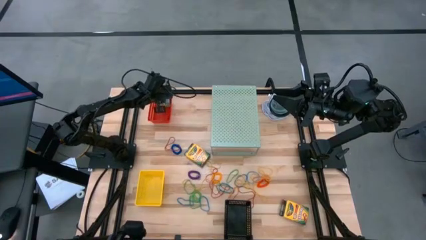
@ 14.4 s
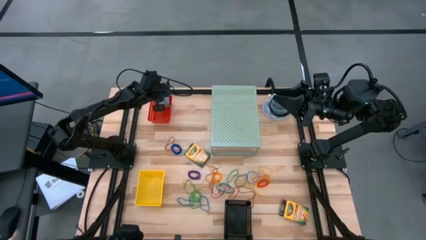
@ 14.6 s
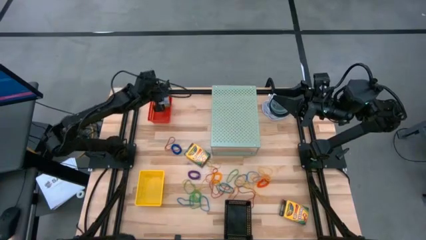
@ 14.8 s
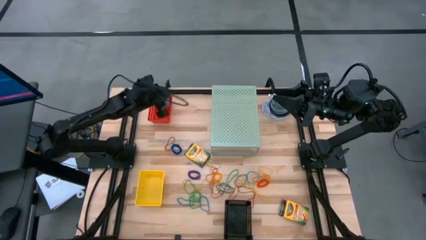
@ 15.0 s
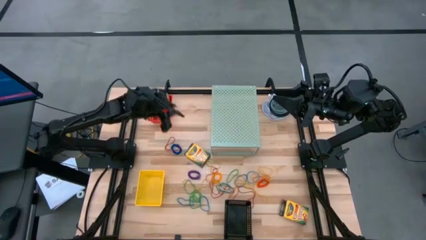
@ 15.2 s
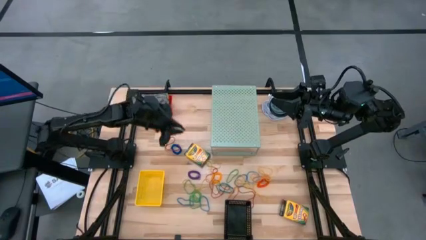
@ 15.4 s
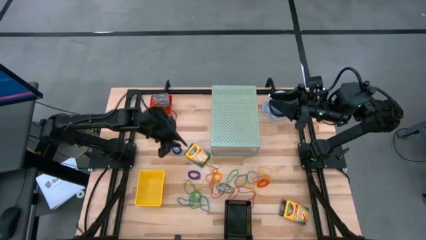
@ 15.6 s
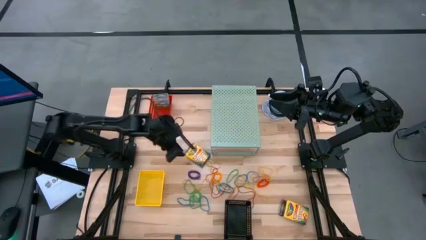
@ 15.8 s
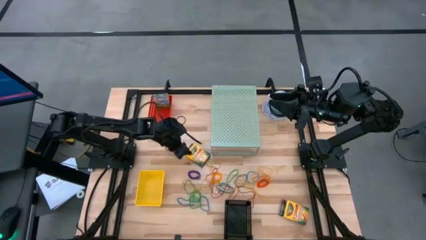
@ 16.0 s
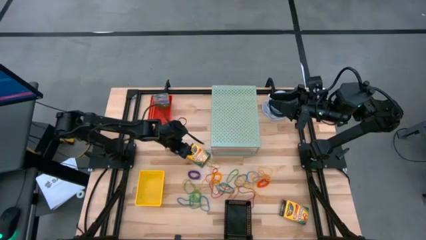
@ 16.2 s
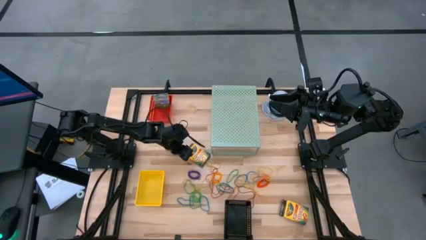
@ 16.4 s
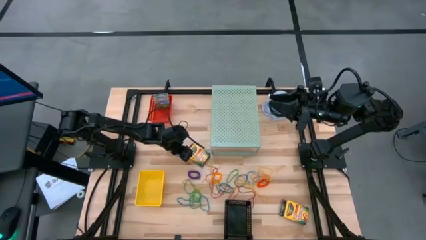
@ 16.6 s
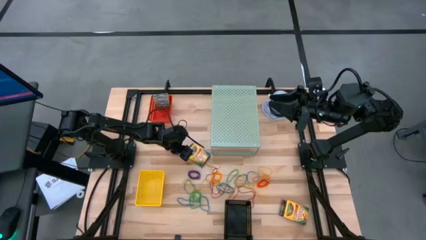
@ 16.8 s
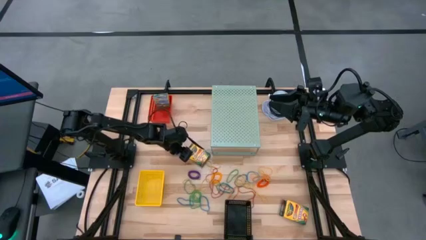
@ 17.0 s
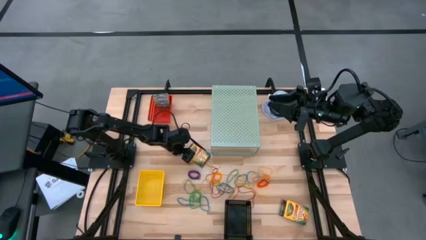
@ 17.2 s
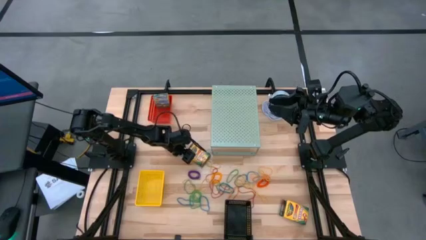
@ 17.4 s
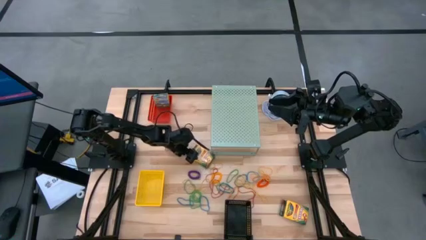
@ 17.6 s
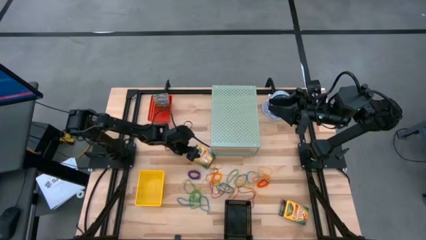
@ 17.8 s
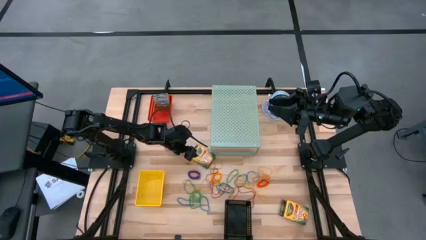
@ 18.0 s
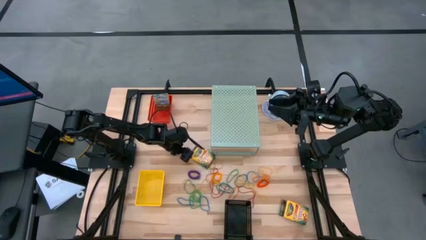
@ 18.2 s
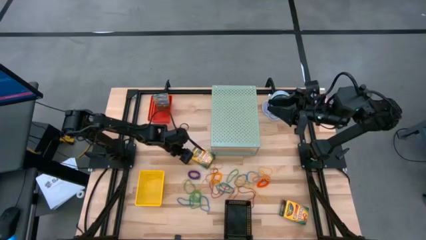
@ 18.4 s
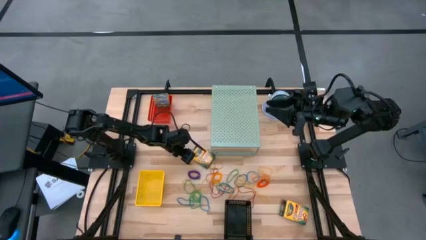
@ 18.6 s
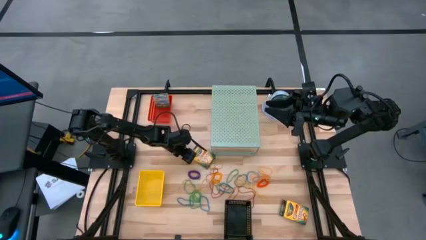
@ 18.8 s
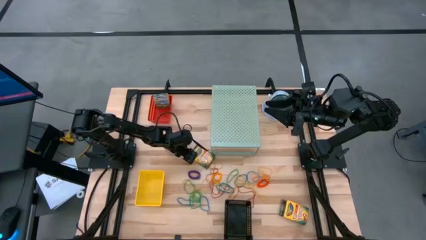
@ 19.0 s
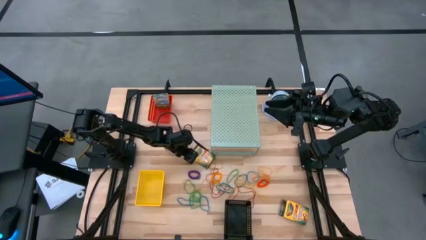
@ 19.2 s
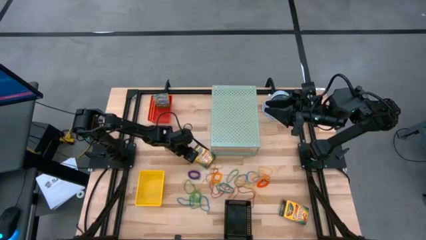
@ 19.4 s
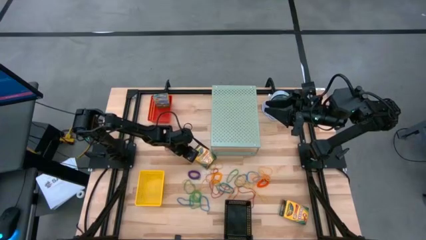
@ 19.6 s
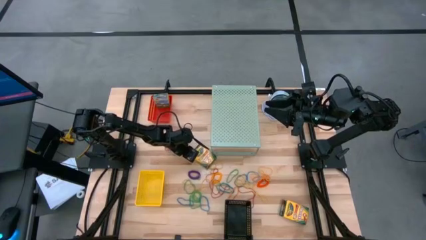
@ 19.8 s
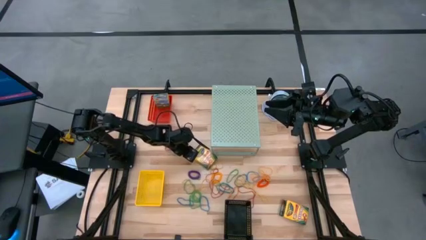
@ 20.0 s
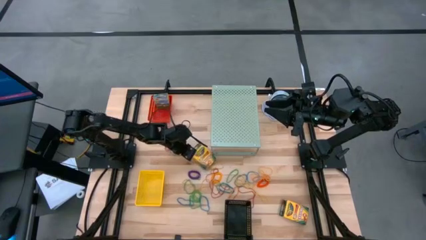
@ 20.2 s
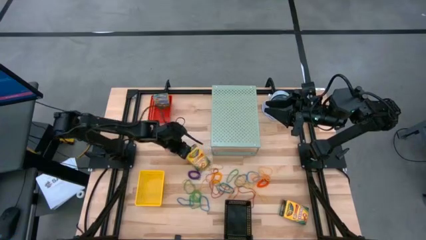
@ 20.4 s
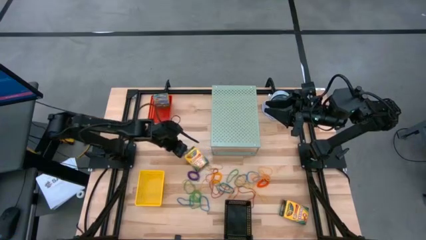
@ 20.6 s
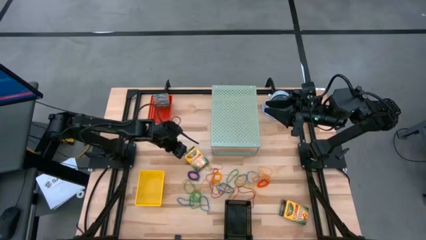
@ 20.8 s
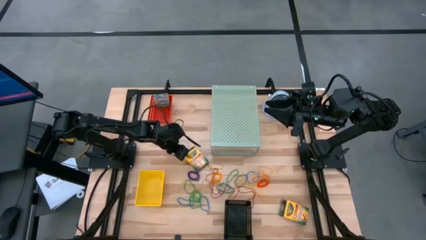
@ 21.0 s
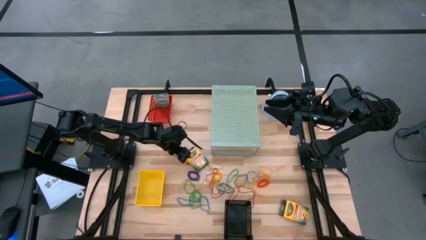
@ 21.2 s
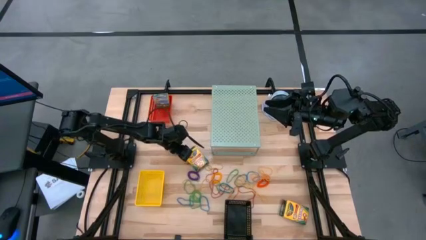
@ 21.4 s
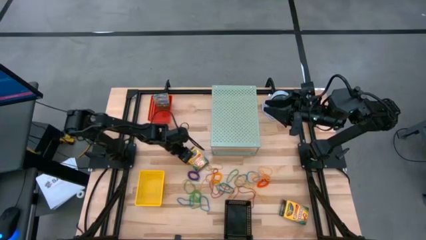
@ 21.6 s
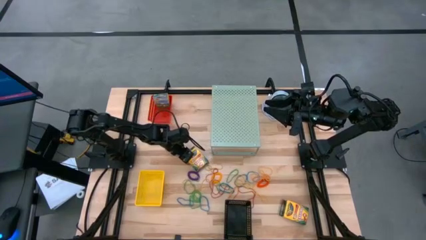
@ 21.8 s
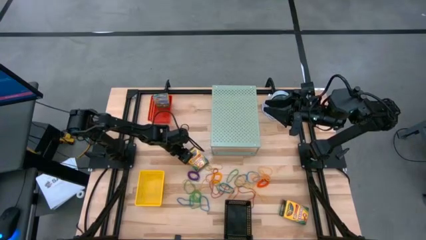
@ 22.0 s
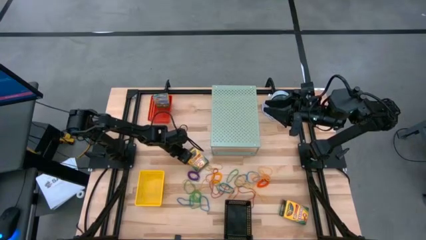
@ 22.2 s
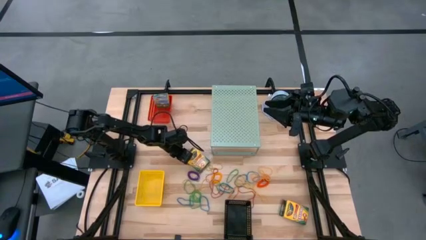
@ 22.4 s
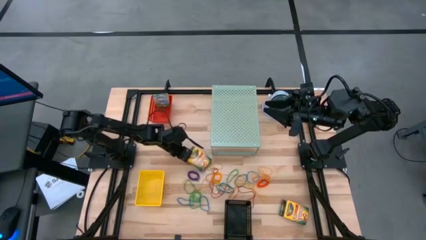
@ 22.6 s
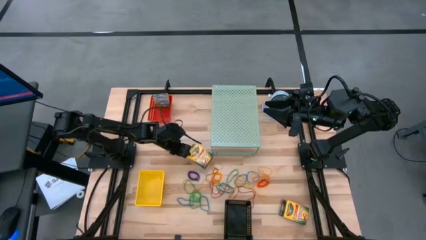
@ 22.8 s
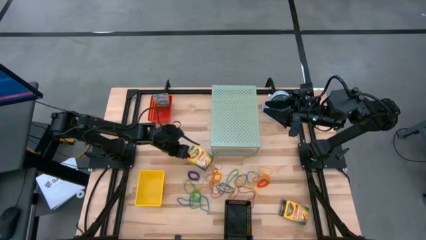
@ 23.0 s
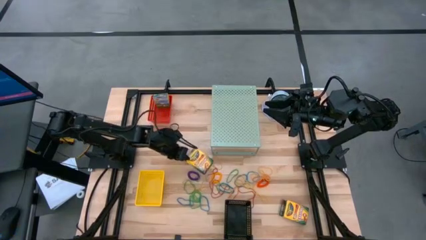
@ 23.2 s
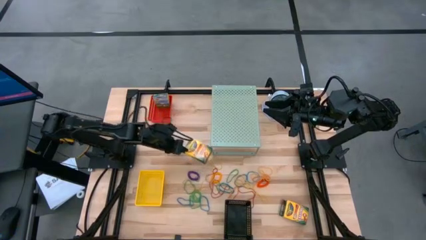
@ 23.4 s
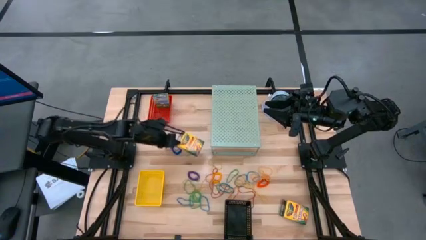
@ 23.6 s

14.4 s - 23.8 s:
Task: Pick & Place Office Desk Supplies
Put the crayon box into the red bin

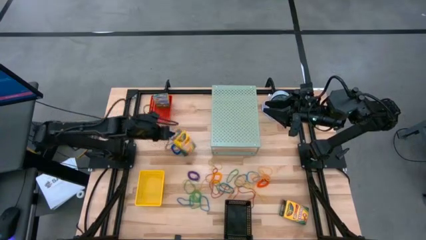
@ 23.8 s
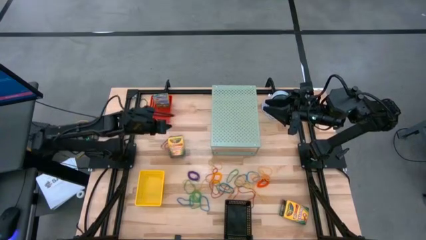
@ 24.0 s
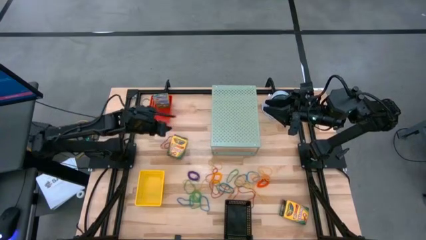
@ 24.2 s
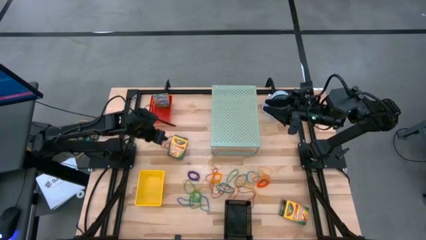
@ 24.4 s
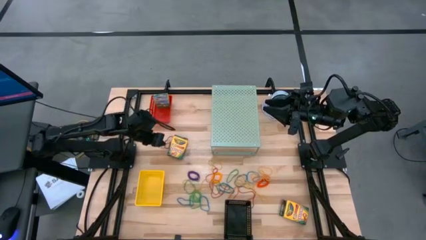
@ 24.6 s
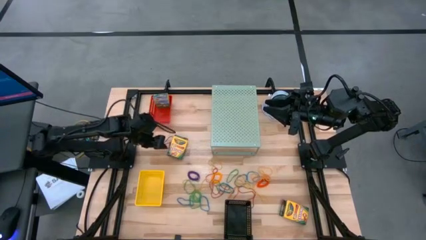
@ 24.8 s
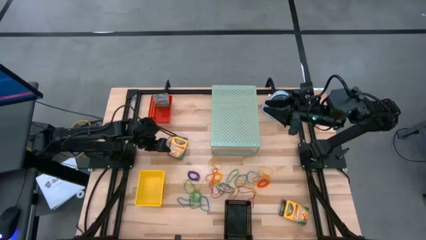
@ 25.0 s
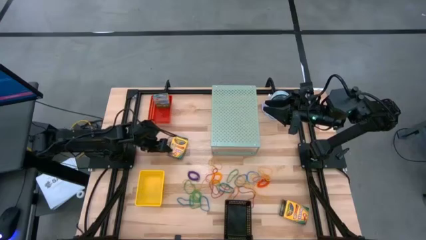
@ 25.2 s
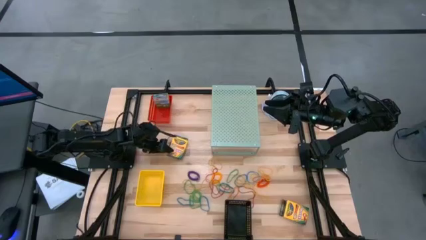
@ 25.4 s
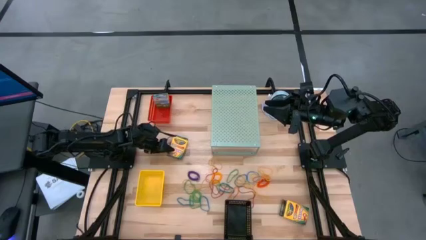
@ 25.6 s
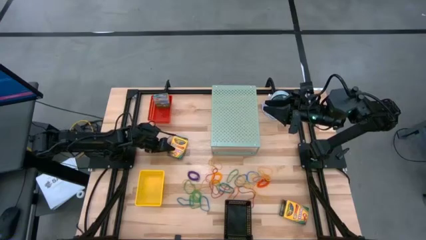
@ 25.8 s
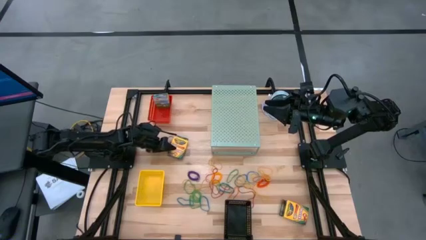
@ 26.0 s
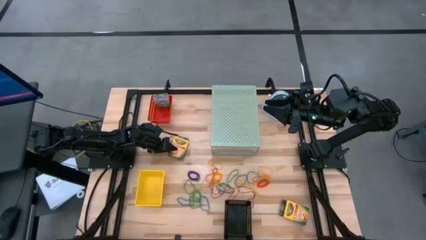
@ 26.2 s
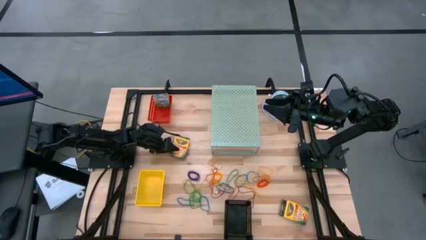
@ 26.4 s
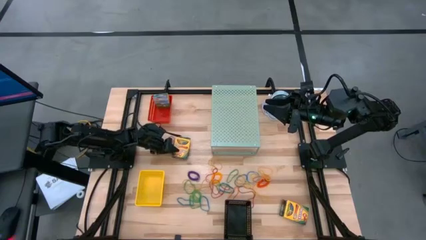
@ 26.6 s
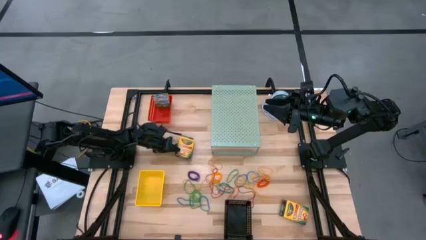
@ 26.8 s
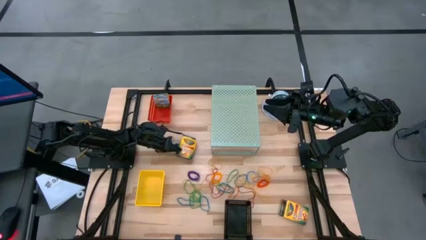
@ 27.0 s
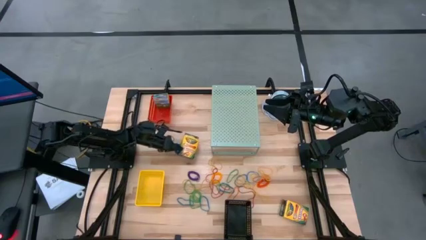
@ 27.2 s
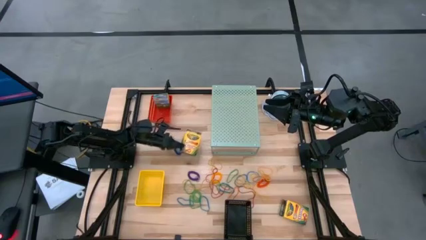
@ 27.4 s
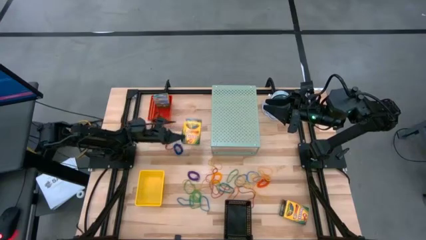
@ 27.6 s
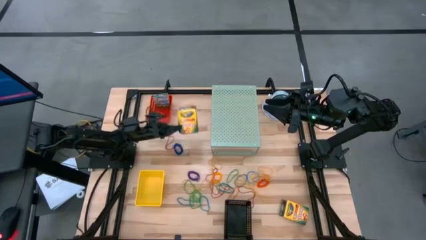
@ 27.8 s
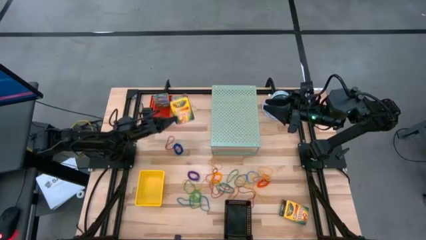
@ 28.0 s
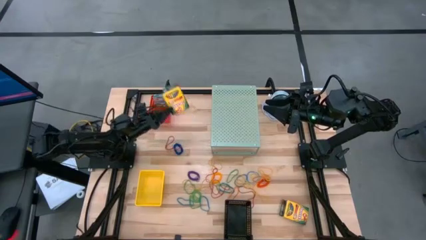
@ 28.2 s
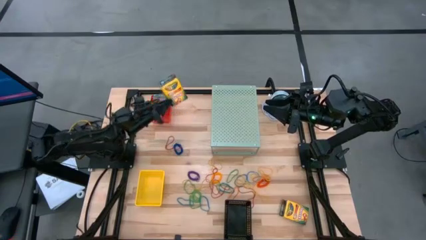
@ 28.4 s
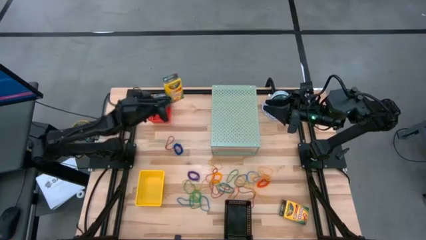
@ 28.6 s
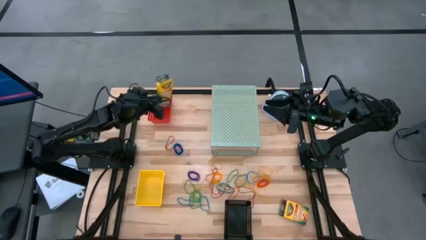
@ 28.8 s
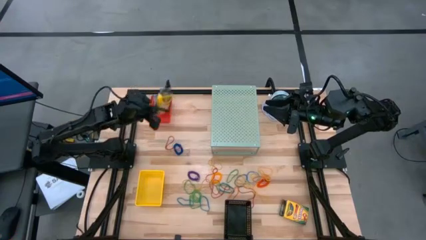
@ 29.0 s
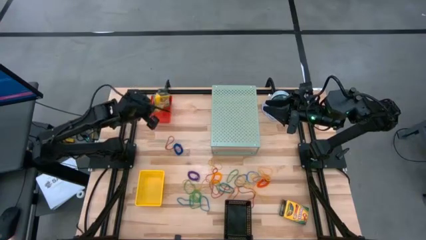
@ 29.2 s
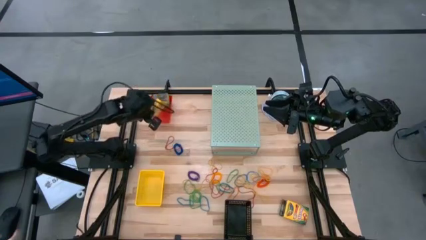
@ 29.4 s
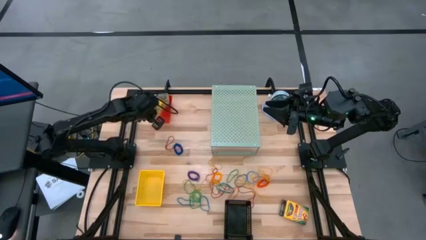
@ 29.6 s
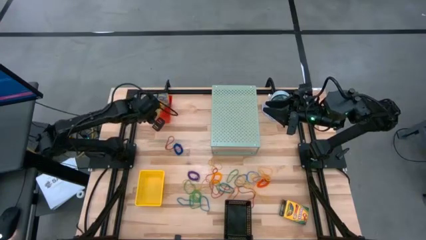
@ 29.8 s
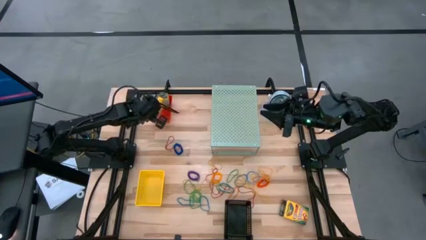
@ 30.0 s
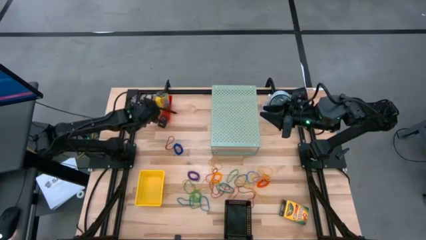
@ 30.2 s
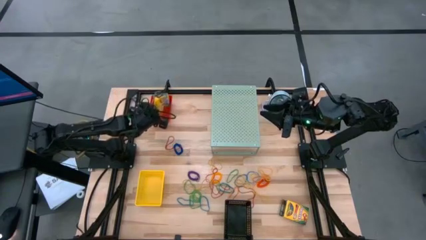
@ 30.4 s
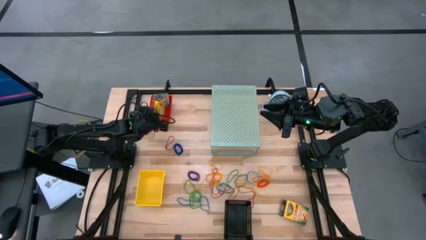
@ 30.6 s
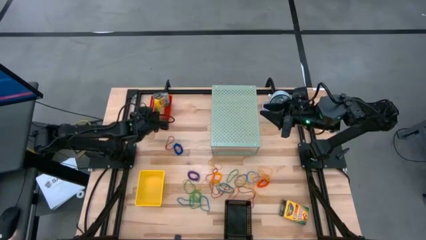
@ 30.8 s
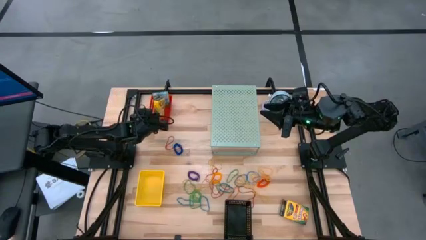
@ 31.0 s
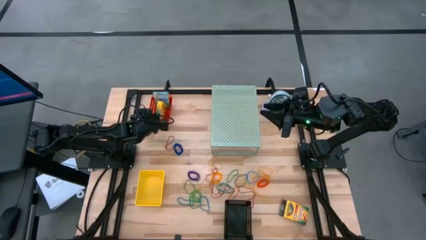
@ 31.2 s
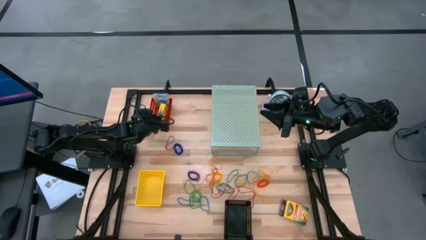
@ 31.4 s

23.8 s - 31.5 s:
Put the crayon box into the red bin
